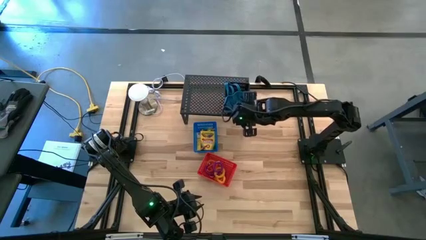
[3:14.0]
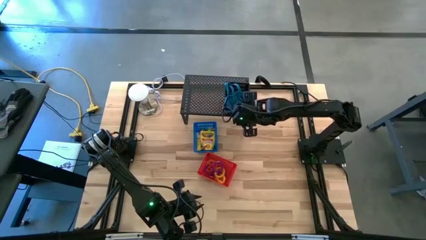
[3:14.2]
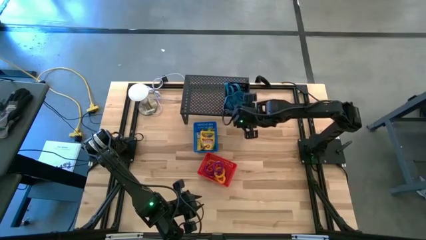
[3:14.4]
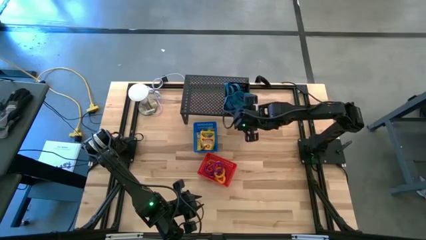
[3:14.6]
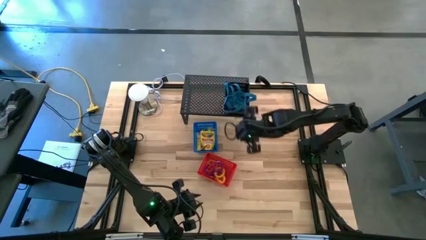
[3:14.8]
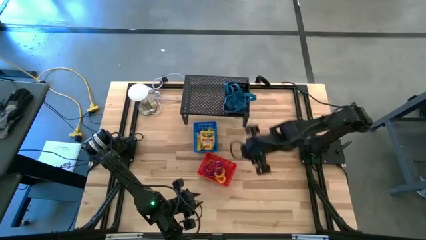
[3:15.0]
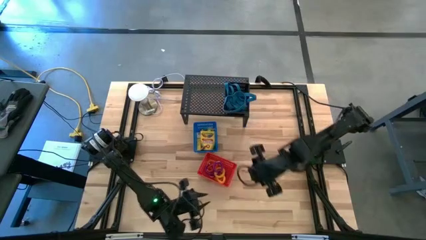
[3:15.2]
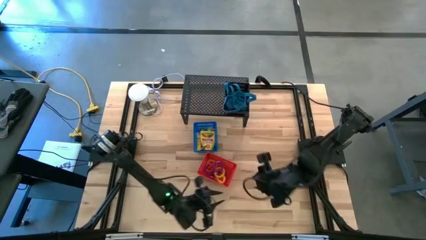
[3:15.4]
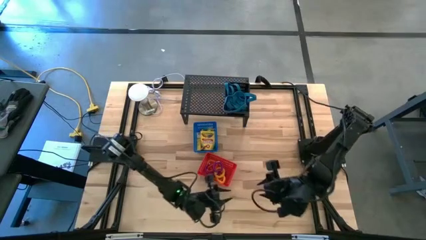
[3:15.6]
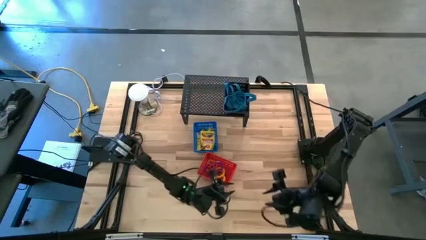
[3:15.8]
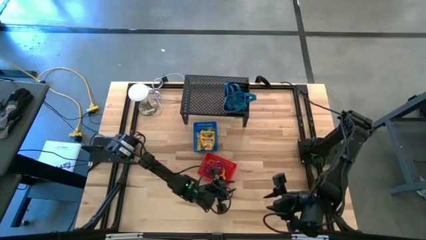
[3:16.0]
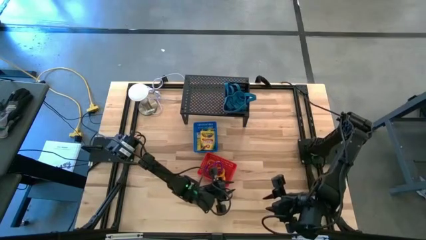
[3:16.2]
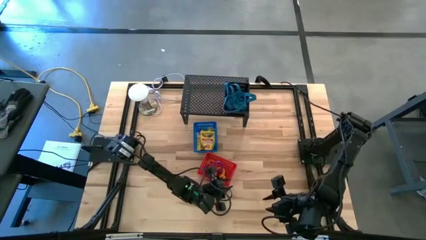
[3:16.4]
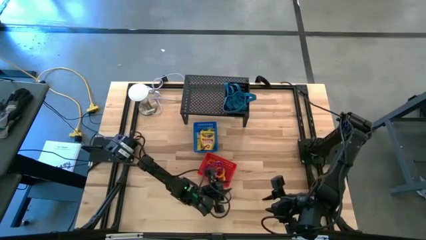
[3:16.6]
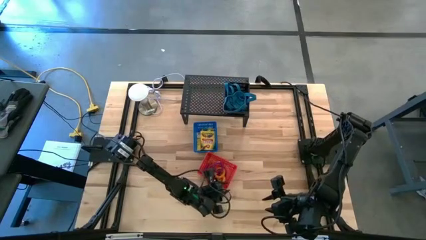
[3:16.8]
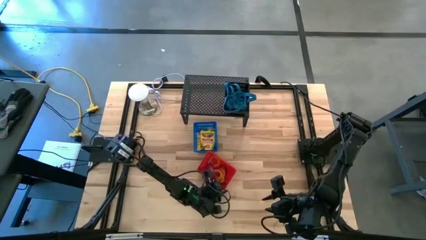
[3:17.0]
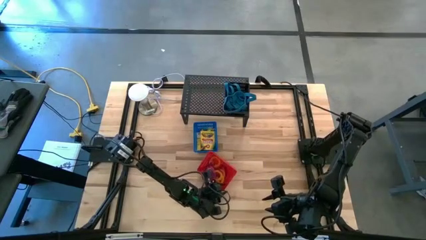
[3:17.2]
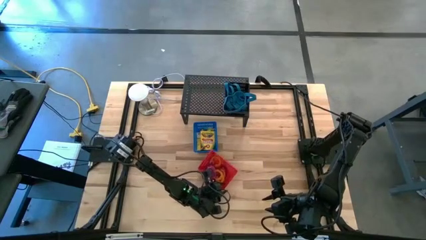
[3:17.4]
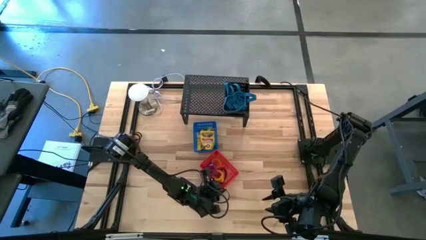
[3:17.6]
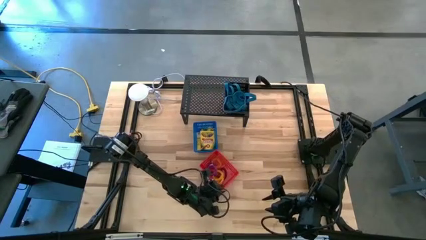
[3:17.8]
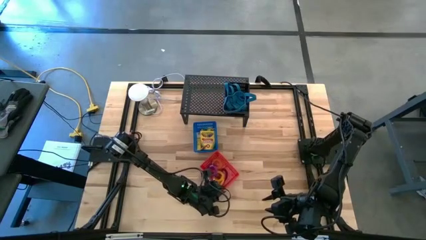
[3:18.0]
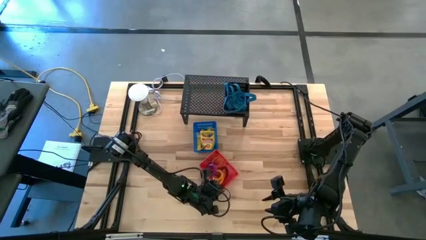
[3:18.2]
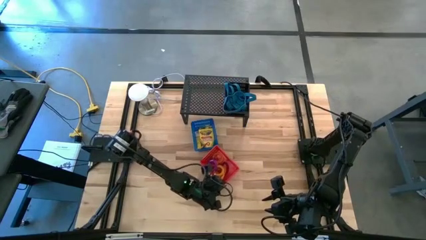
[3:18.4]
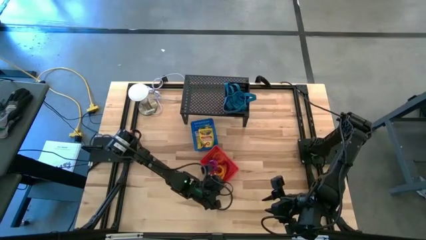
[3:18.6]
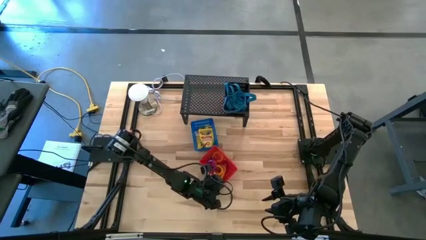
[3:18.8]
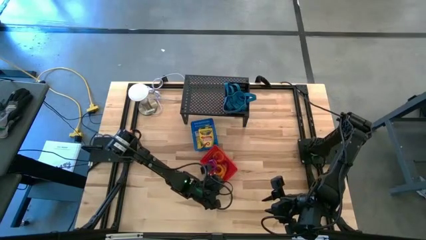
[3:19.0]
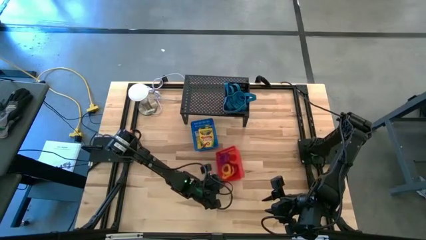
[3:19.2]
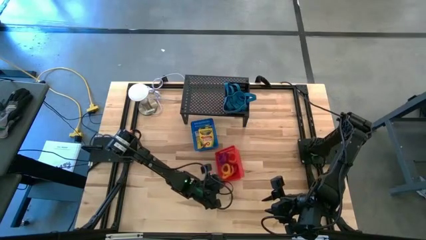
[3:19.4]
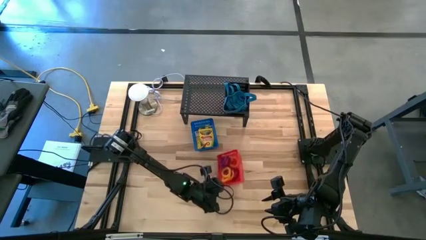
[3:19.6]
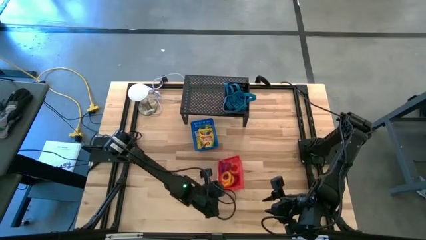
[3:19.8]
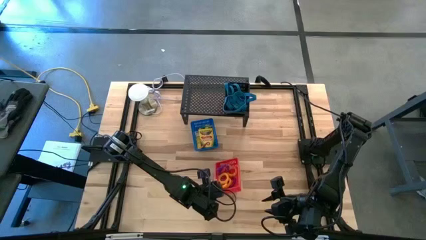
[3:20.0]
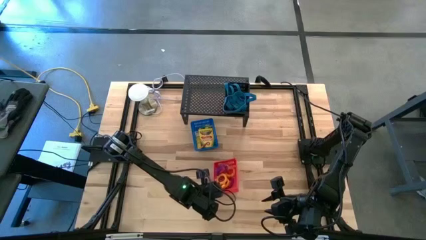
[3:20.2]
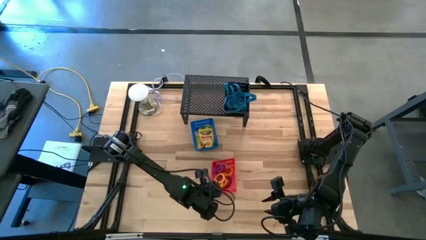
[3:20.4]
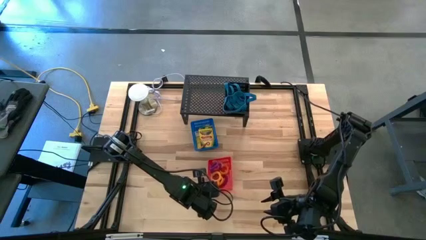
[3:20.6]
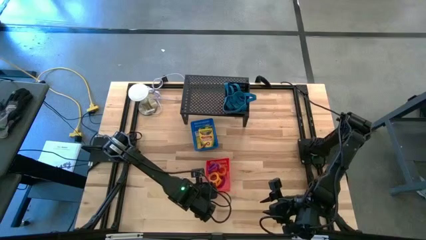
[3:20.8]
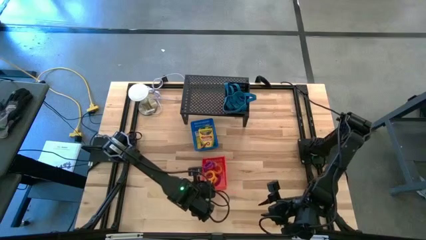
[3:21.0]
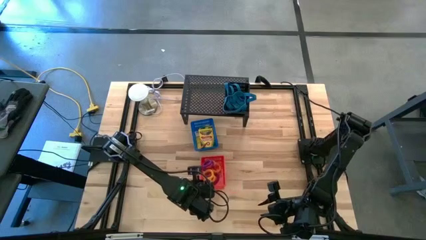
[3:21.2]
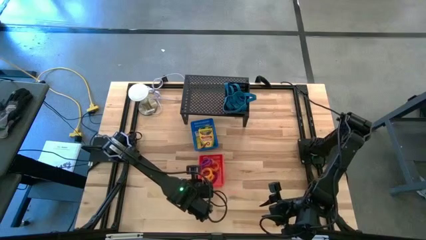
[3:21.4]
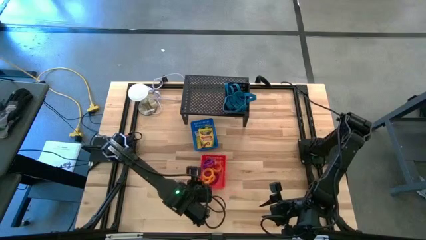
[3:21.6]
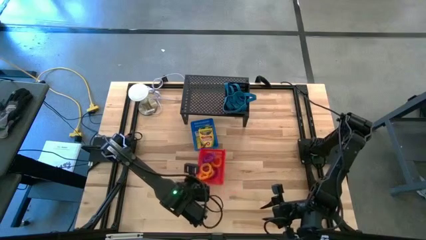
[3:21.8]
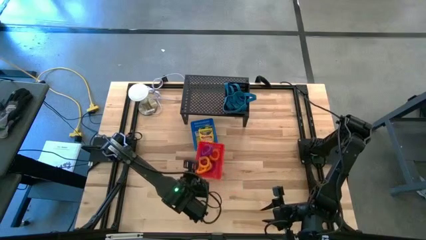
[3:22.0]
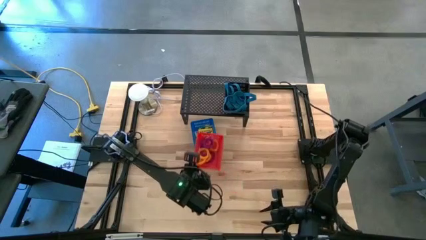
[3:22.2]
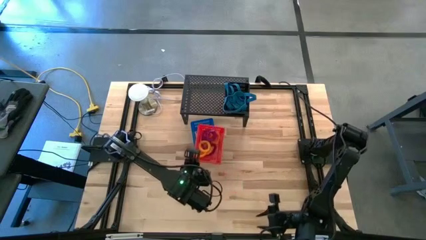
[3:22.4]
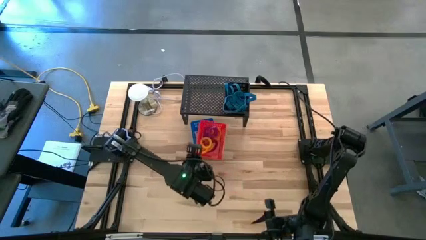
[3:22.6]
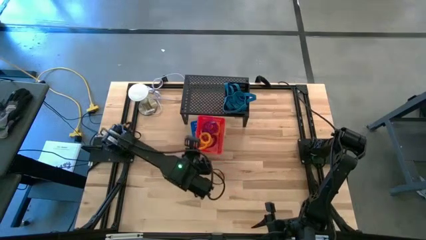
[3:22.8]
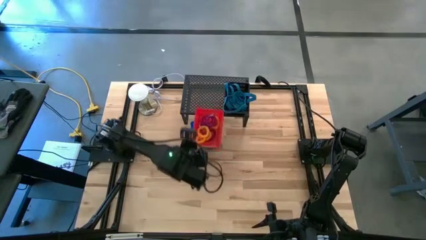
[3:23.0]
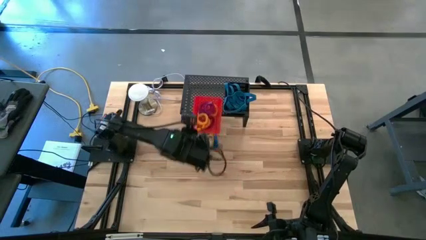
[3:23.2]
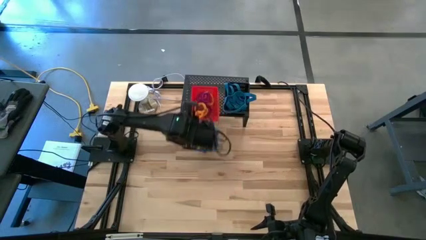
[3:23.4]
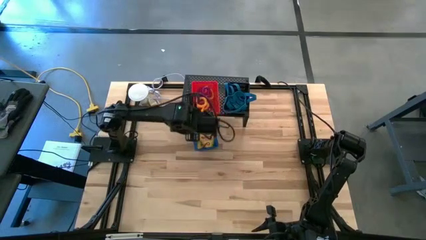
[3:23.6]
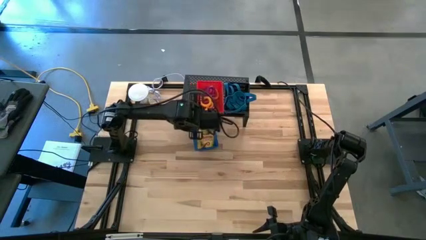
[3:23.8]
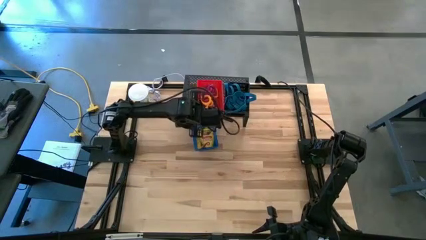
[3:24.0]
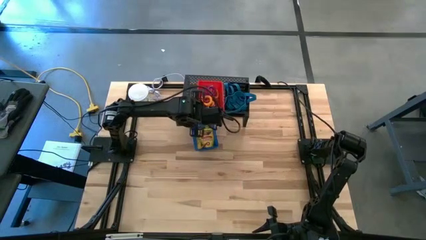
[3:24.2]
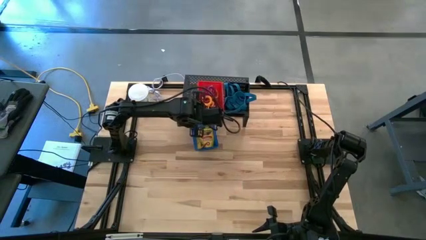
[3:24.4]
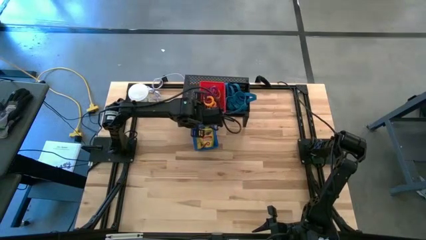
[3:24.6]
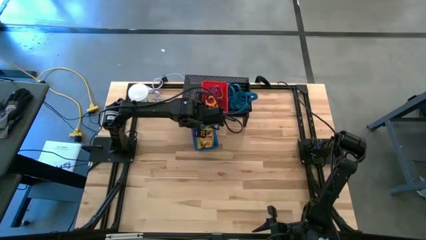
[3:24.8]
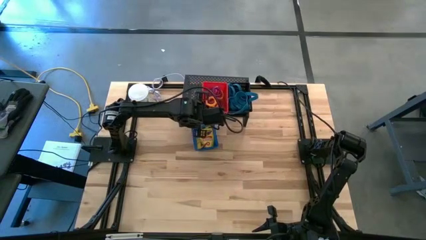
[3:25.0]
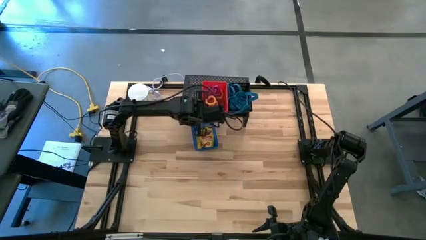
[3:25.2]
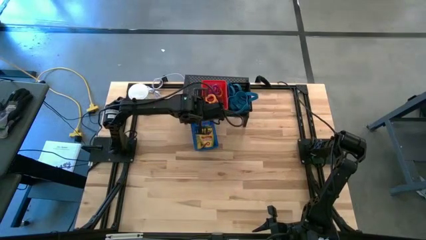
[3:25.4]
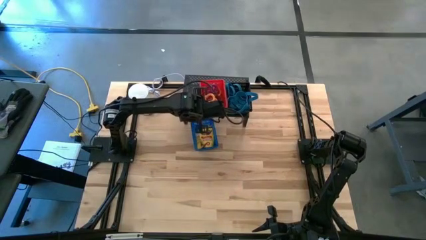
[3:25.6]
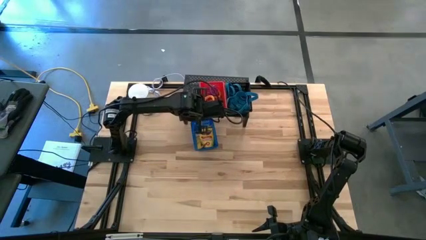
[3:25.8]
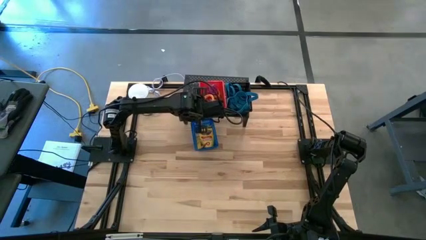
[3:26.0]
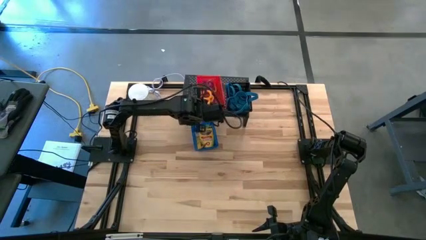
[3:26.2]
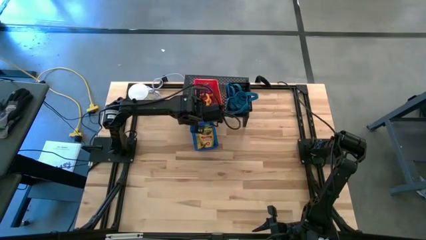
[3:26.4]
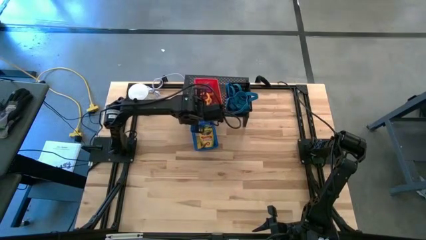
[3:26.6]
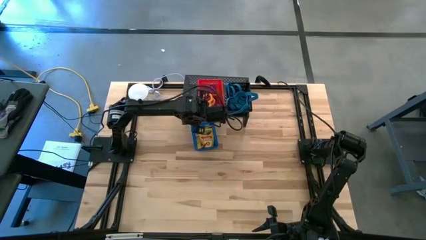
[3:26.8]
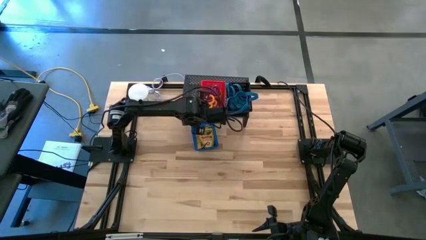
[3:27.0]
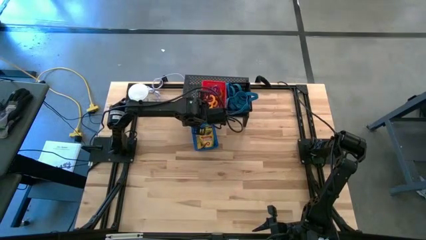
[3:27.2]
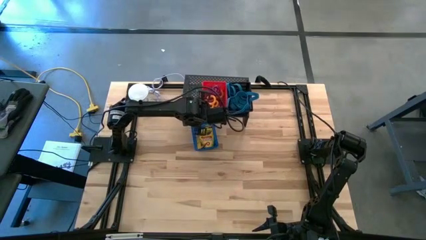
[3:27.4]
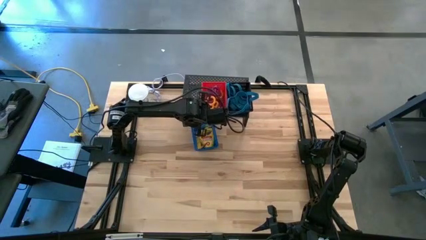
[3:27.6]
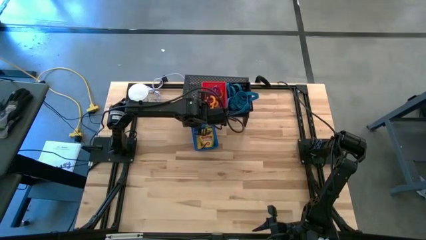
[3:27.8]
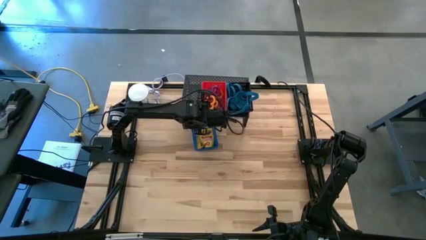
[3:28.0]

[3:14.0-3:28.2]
Task: Pick & Place Office Desk Supplies
Put the red bin on the shelf

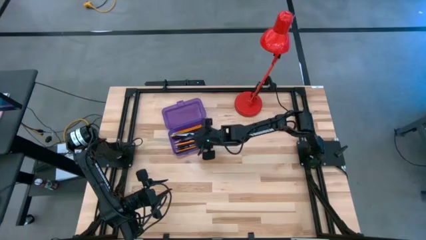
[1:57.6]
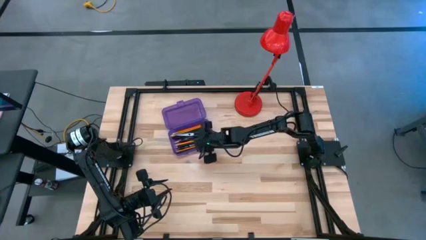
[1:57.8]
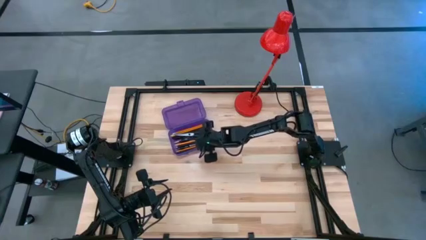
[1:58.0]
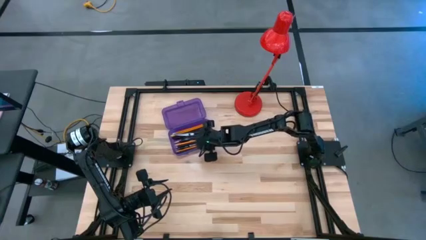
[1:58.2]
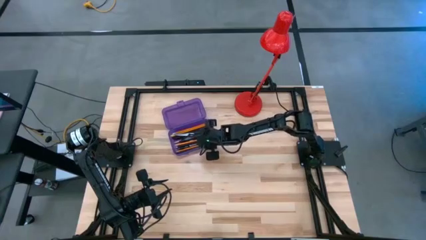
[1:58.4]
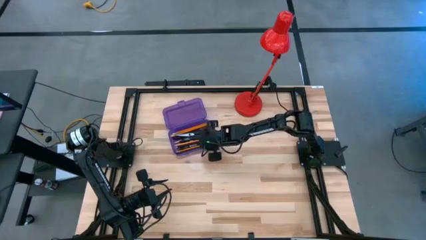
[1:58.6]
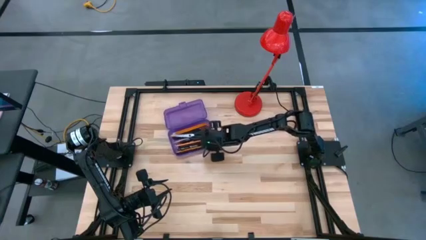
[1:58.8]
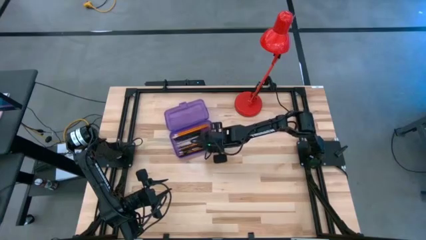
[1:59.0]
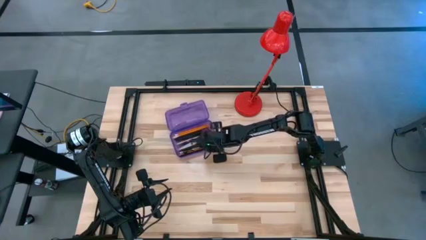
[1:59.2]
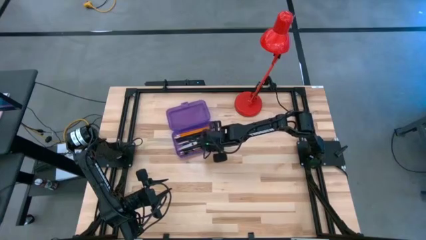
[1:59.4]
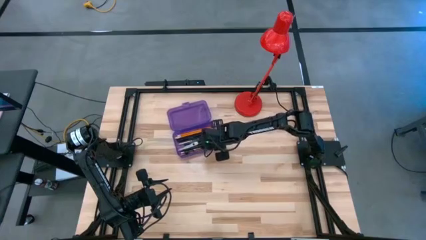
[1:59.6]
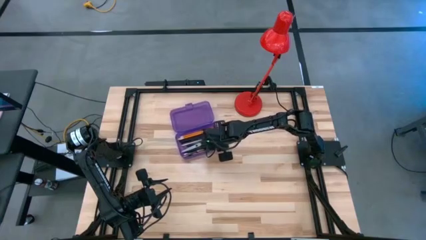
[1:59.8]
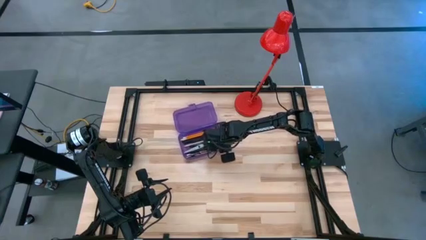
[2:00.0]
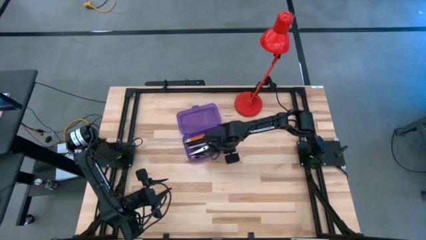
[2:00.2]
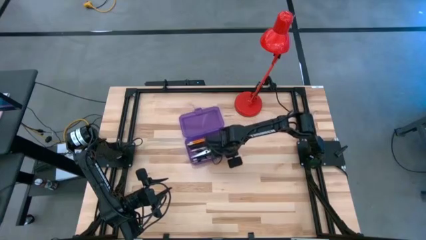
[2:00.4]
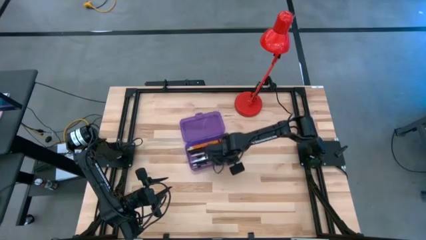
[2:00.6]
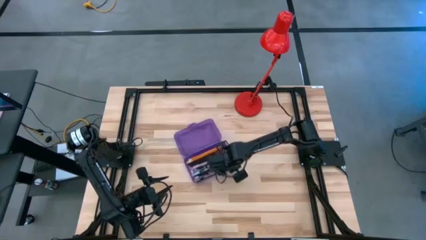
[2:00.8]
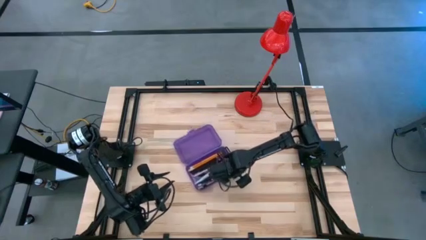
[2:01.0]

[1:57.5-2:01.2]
Task: Pick & place school supplies into a supply box
Move the purple supply box to the center of the table
